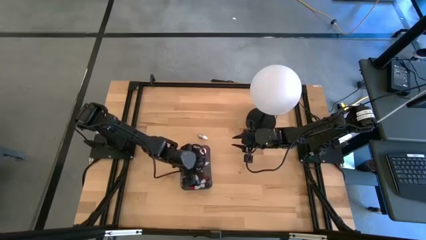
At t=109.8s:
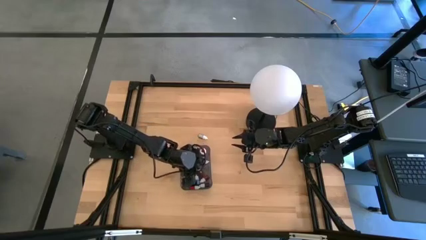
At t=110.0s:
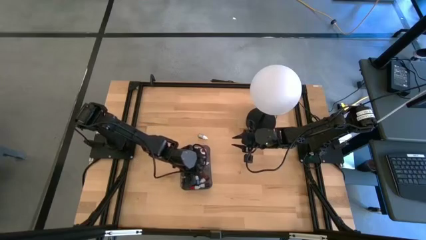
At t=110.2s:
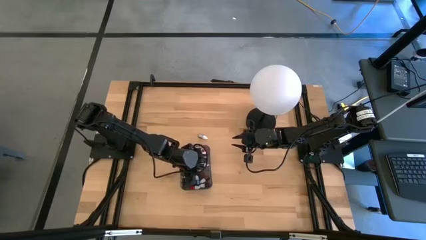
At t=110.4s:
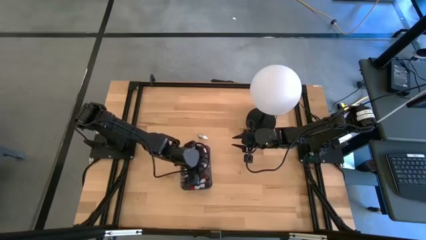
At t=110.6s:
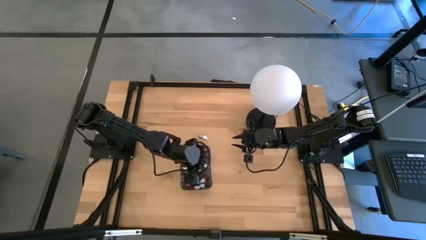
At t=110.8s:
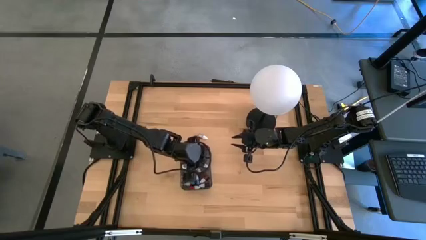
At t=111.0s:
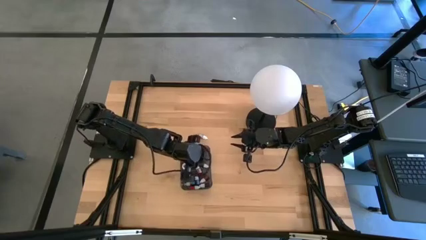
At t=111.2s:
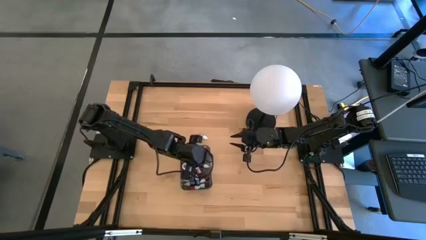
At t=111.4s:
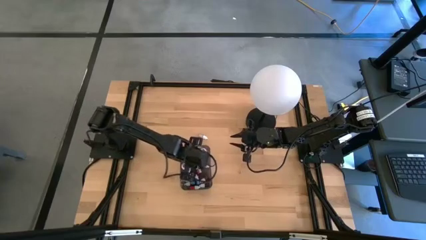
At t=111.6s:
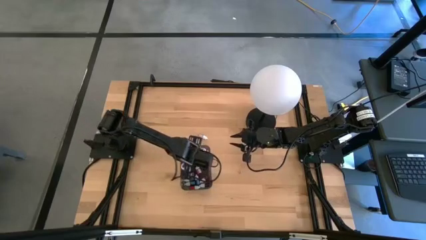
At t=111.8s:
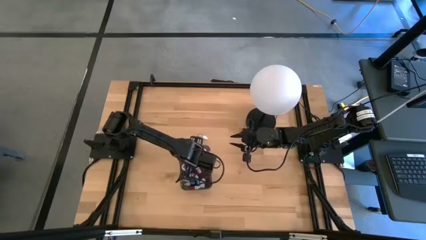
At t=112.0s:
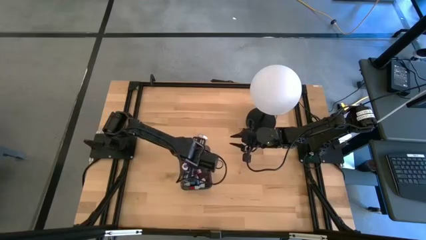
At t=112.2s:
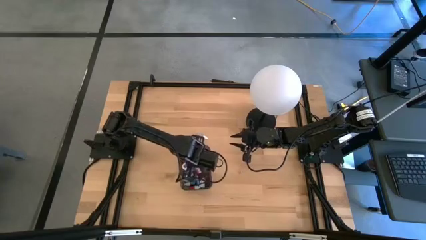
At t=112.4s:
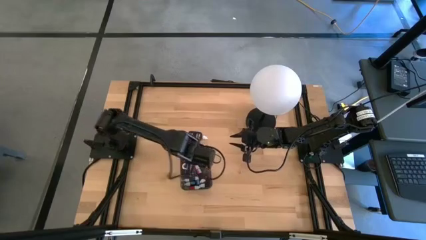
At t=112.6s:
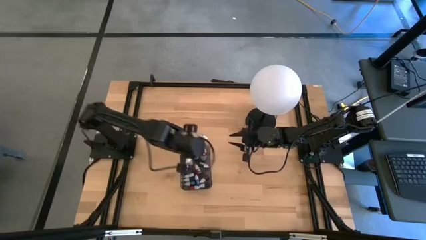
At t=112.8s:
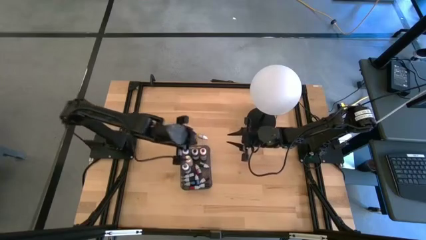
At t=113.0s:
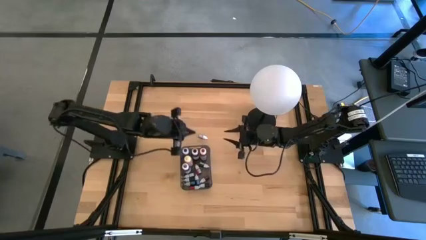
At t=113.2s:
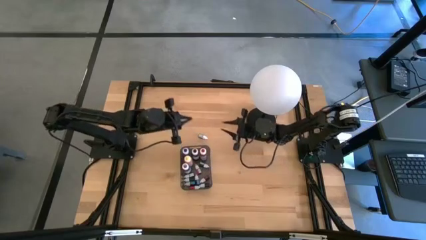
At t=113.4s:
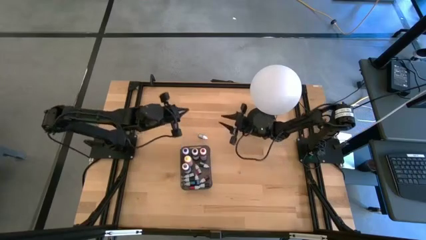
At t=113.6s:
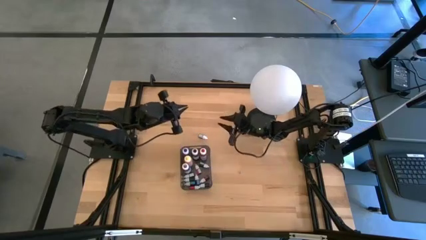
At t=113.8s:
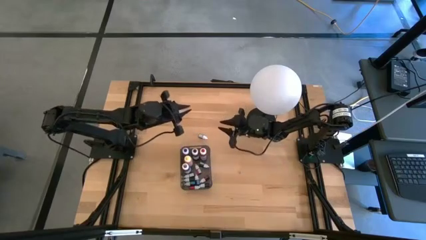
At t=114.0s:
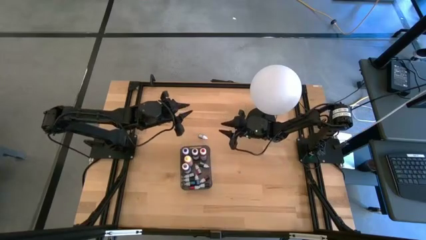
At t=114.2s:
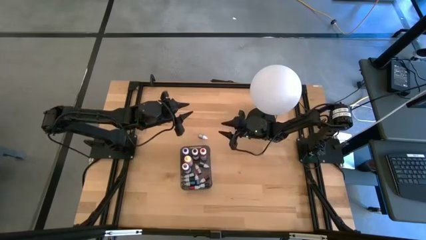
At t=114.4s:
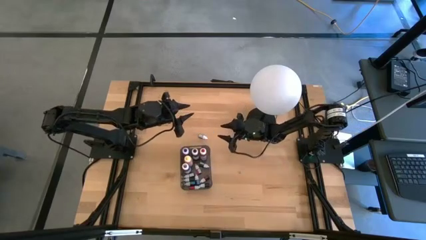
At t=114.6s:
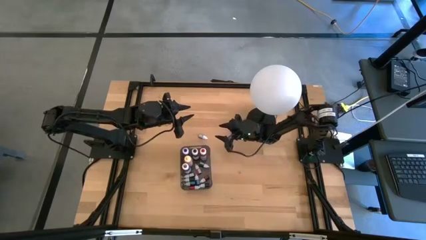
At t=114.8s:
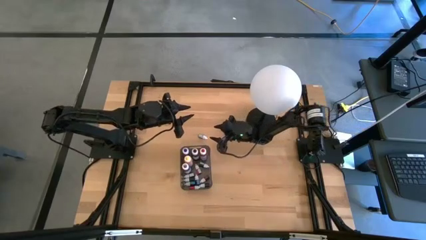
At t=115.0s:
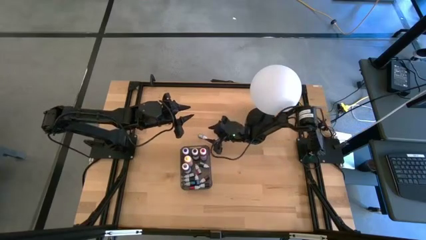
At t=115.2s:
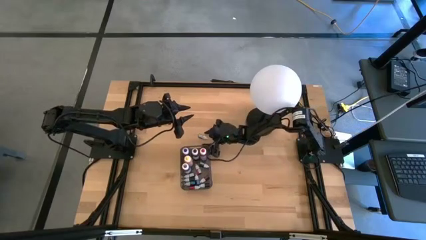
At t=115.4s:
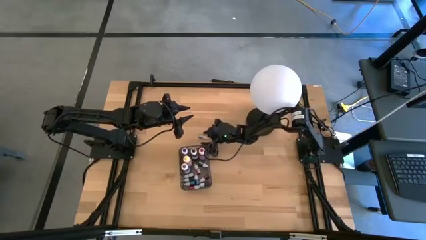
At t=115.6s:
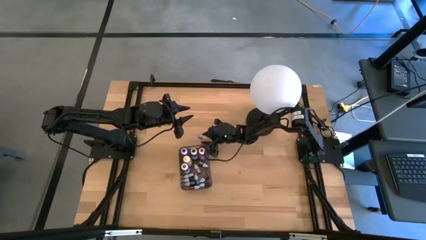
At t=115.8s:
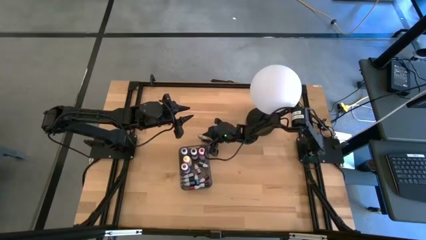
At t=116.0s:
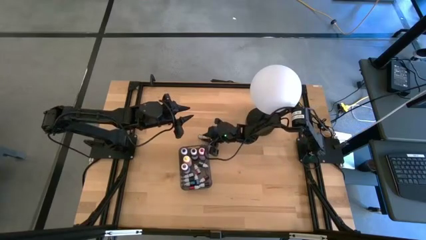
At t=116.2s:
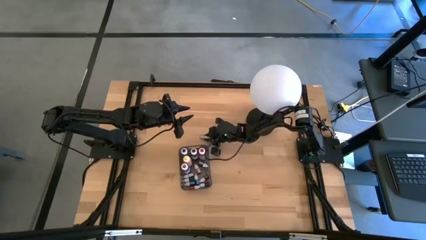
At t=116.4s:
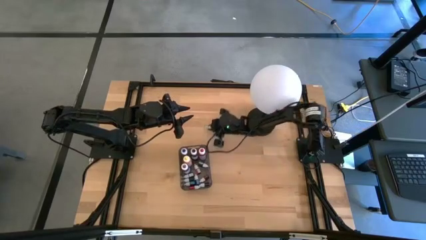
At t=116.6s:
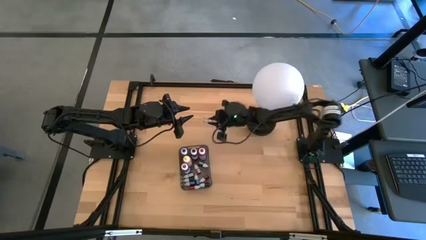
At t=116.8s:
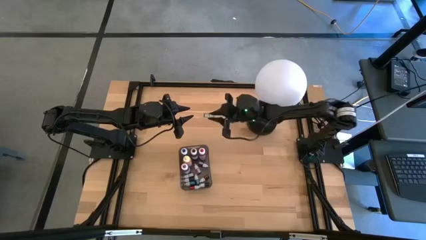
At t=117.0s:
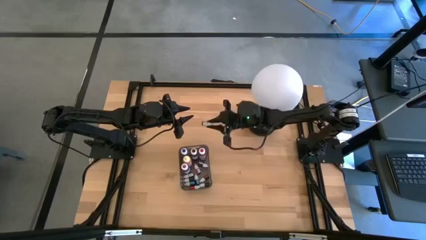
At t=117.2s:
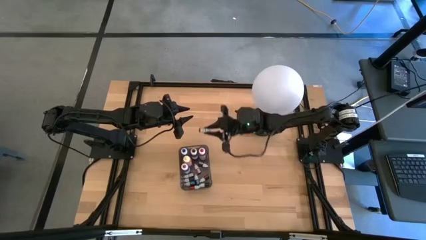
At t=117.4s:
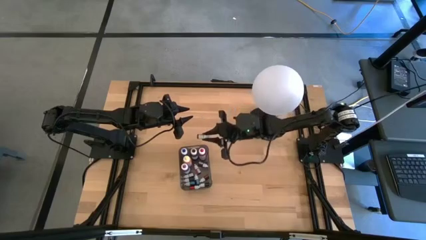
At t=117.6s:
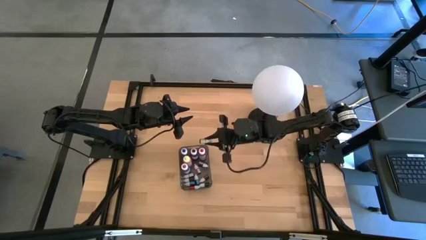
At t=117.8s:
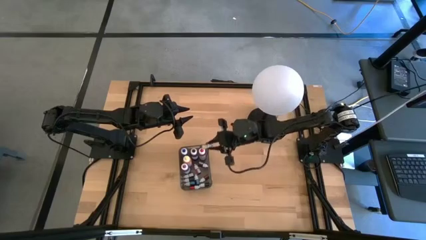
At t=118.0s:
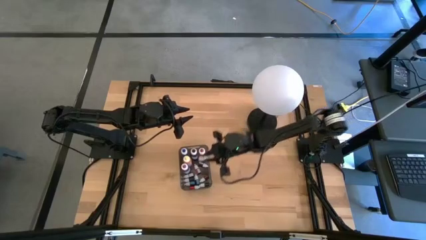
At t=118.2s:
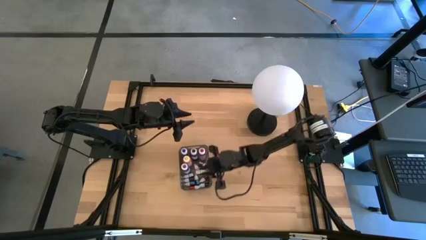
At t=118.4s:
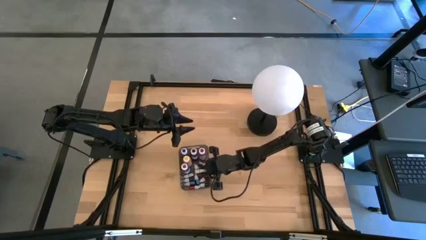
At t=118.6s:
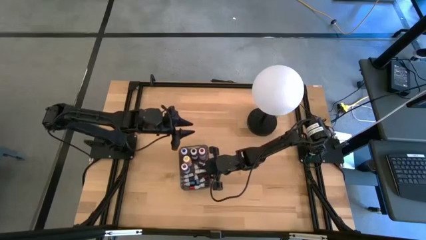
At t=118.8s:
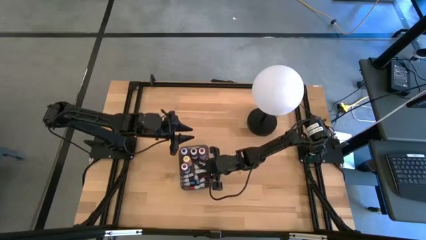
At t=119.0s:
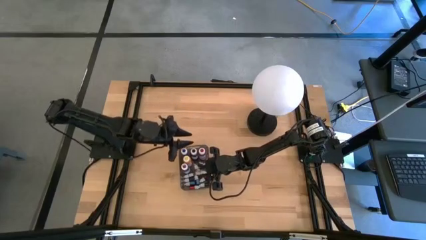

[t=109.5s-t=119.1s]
Task: Pick & Place food coloring
Put the small green food coloring bottle into the black bin

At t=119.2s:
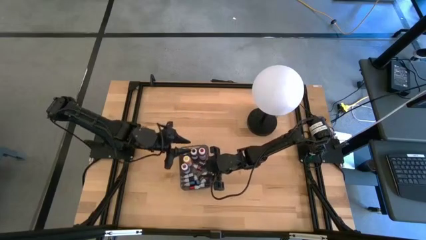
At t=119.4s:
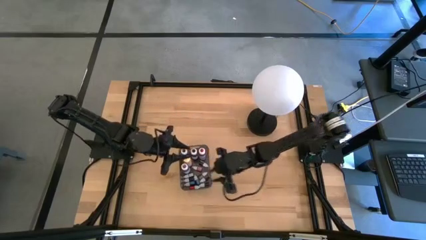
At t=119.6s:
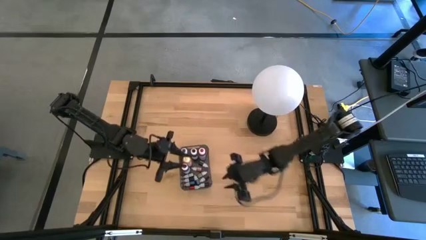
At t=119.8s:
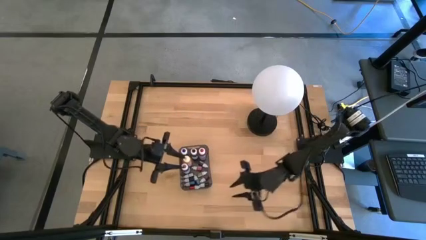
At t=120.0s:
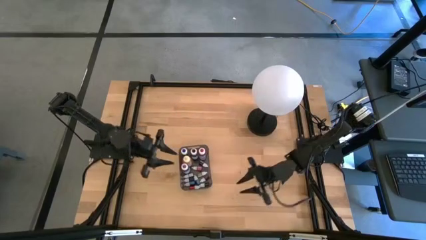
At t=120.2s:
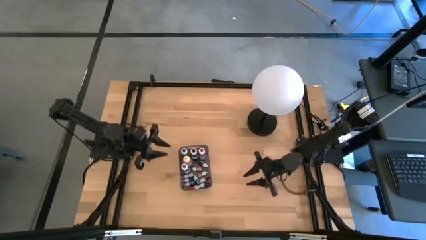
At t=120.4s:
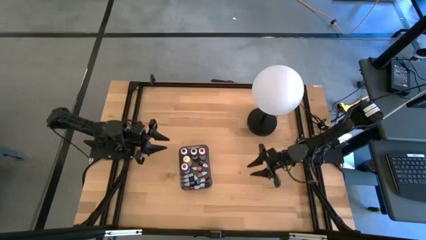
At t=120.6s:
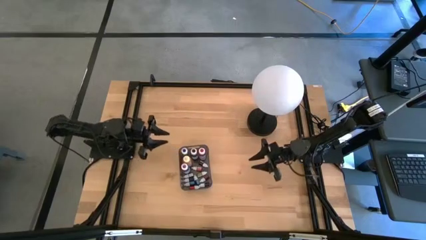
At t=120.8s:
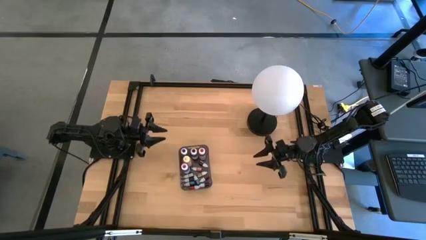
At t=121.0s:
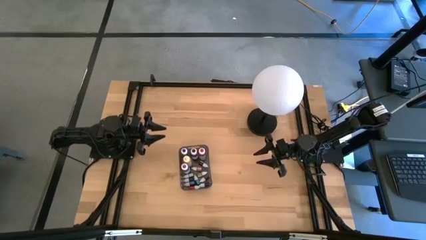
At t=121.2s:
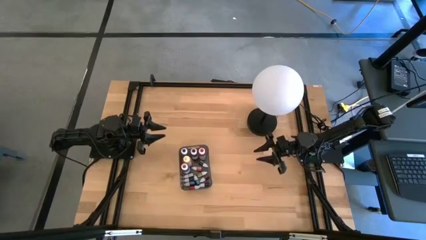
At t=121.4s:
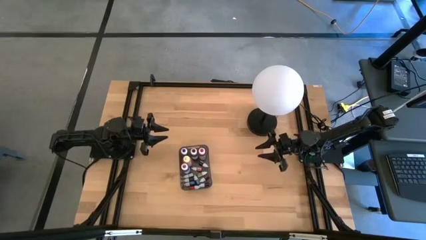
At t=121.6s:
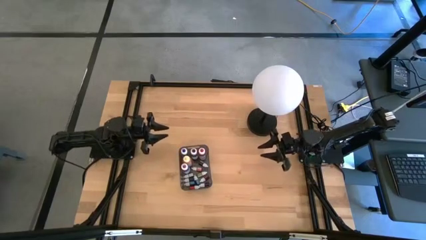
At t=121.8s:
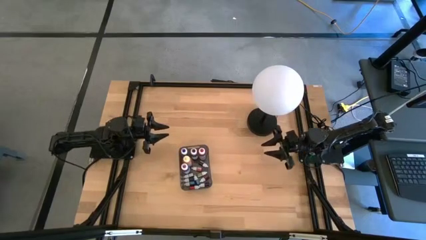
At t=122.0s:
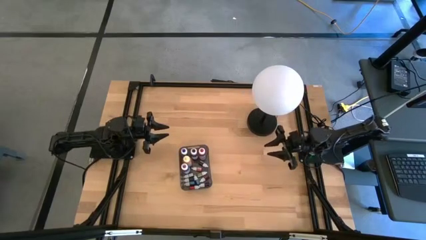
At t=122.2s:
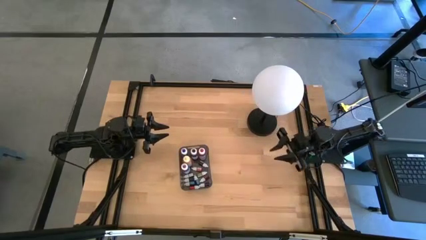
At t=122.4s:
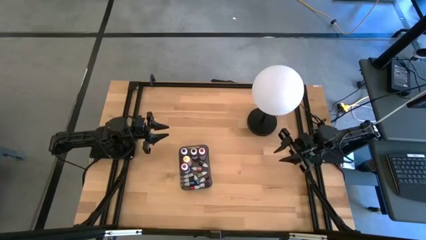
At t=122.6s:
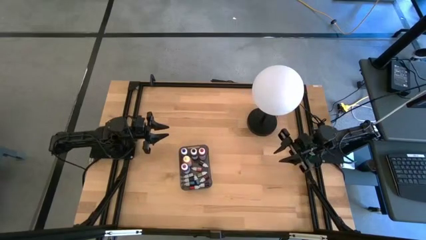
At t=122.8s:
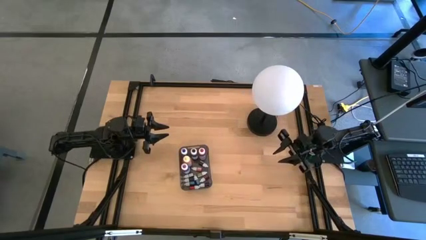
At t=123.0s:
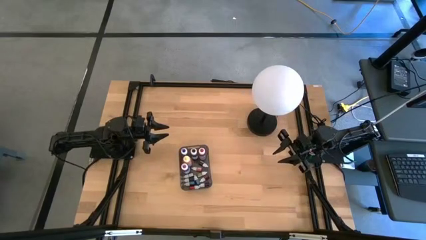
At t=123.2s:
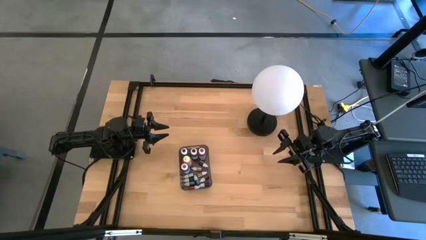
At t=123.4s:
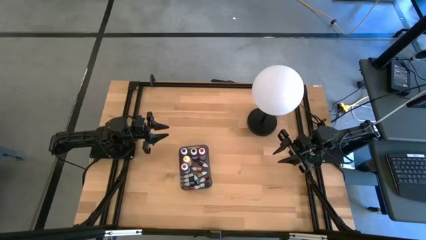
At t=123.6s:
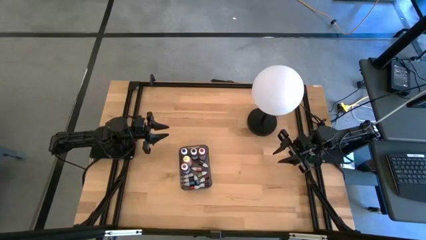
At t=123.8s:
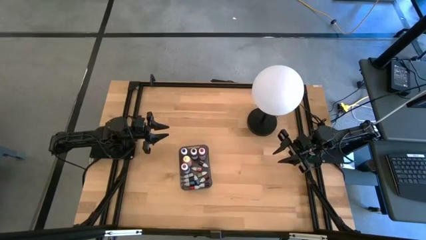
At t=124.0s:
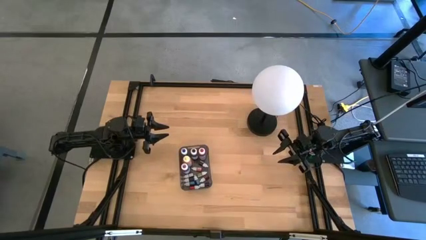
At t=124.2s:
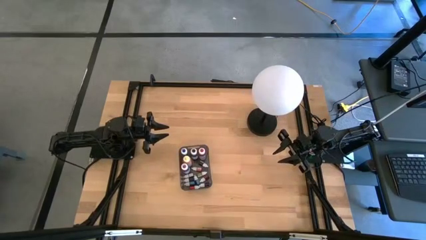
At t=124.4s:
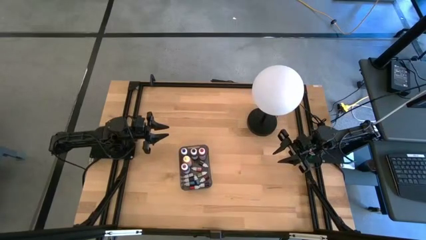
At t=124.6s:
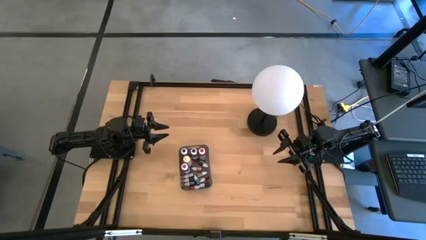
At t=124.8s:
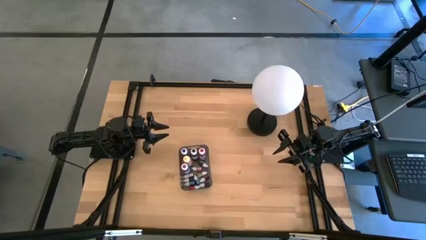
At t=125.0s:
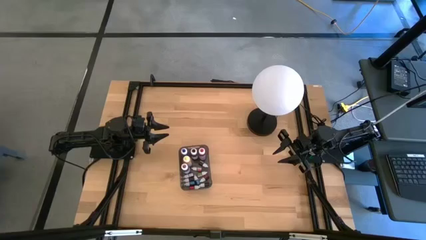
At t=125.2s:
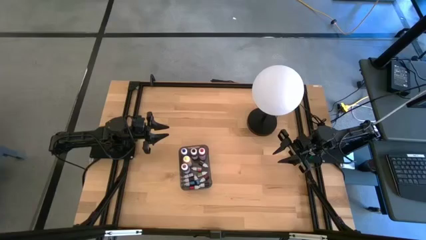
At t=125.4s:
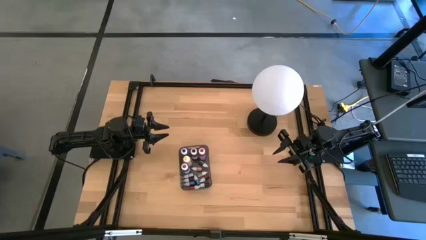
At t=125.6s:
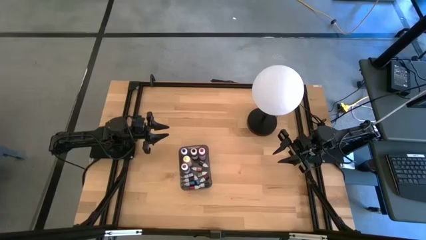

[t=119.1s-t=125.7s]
Return to Home Position
